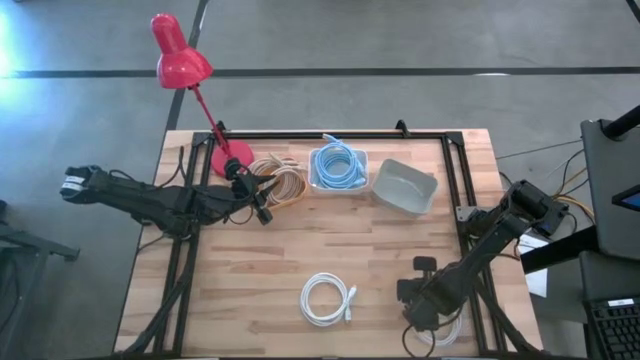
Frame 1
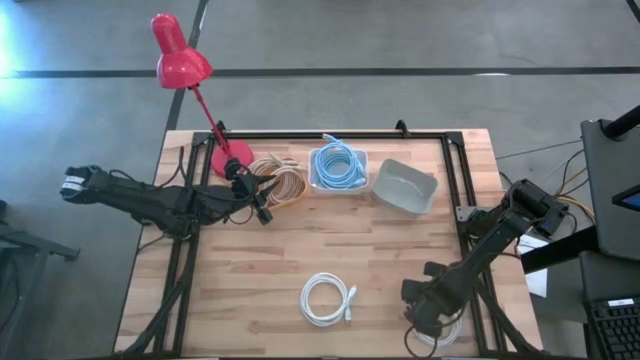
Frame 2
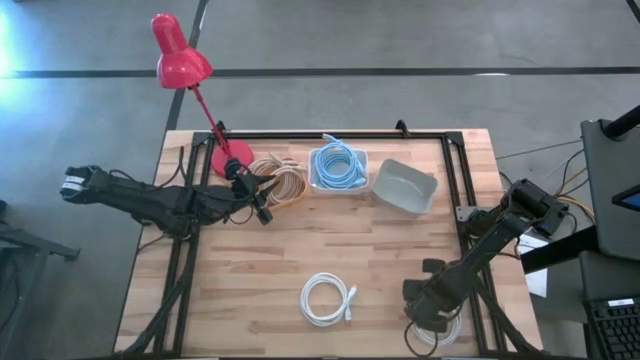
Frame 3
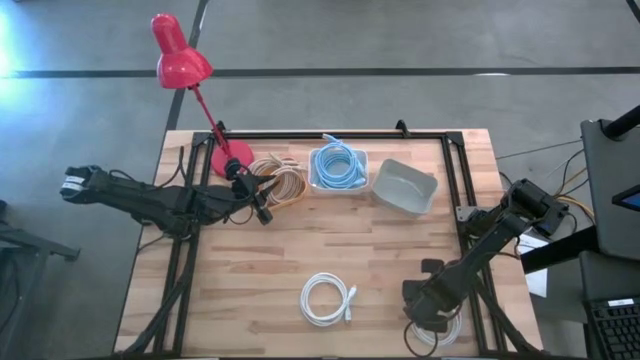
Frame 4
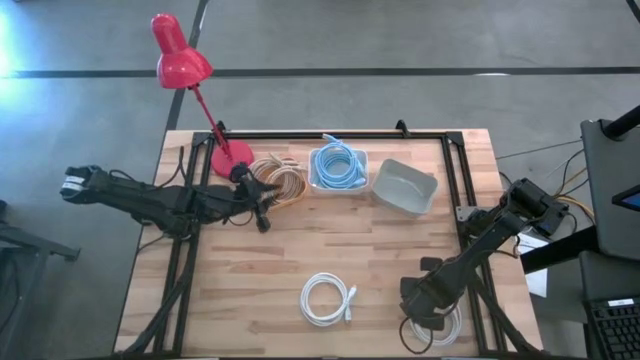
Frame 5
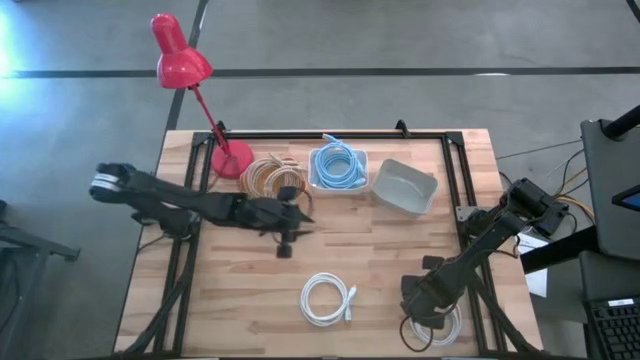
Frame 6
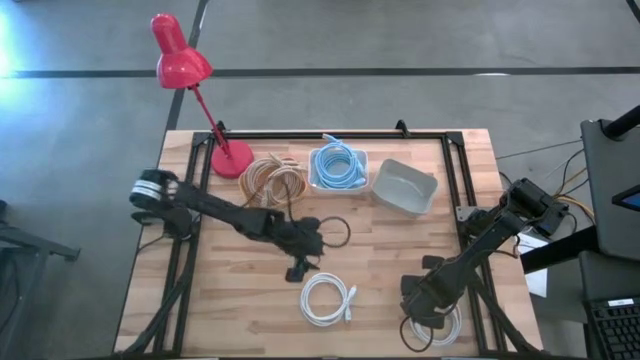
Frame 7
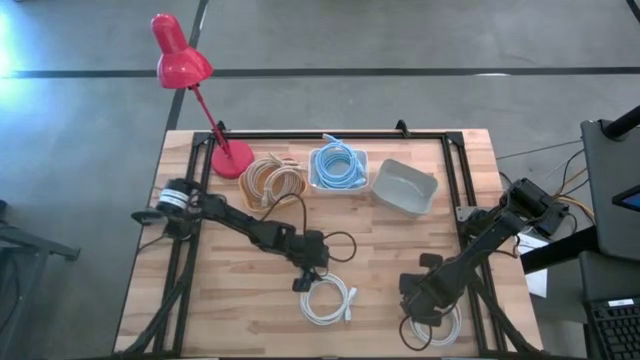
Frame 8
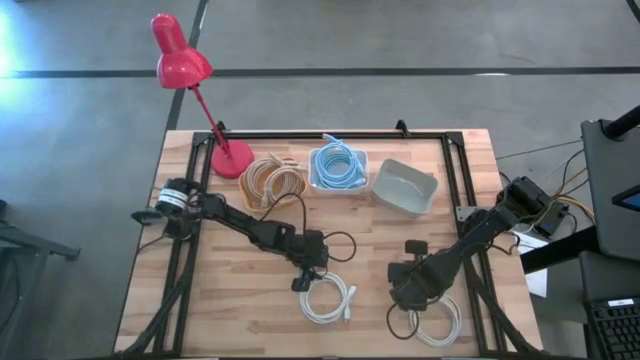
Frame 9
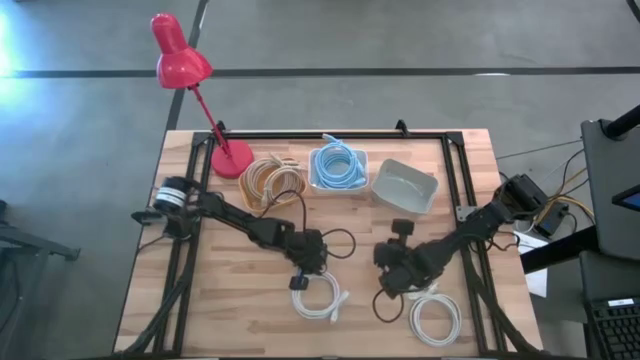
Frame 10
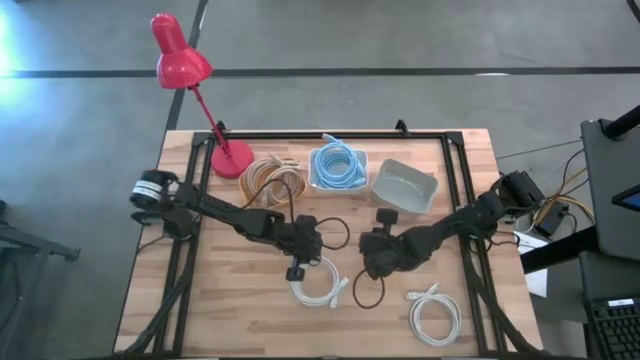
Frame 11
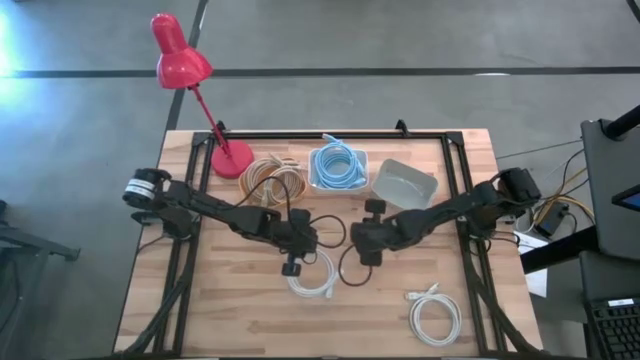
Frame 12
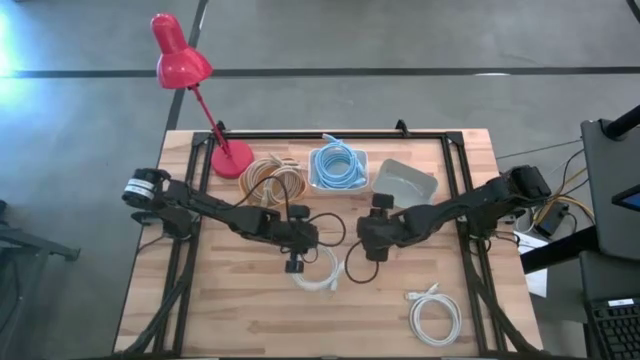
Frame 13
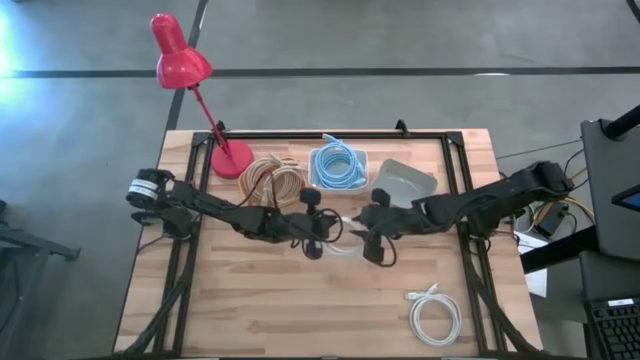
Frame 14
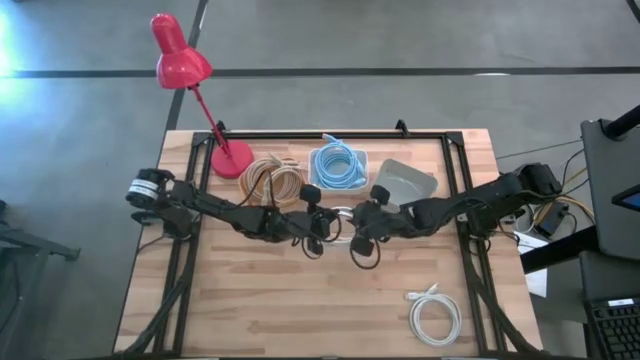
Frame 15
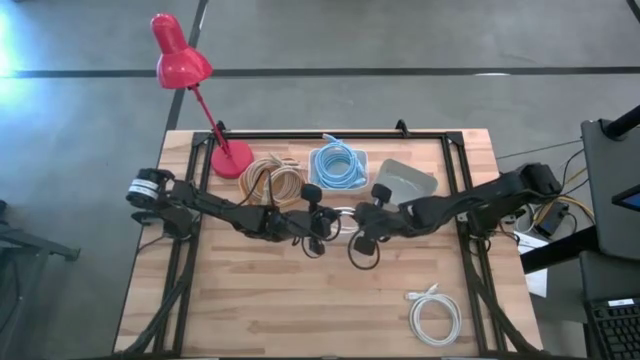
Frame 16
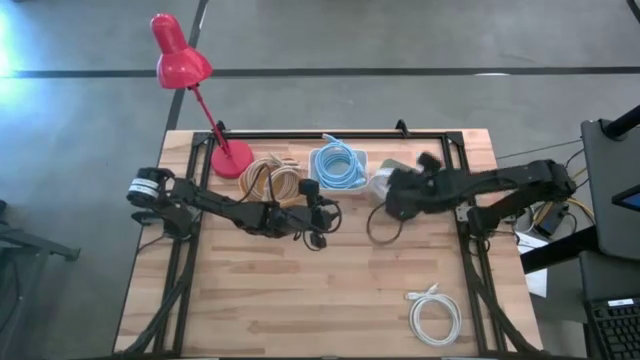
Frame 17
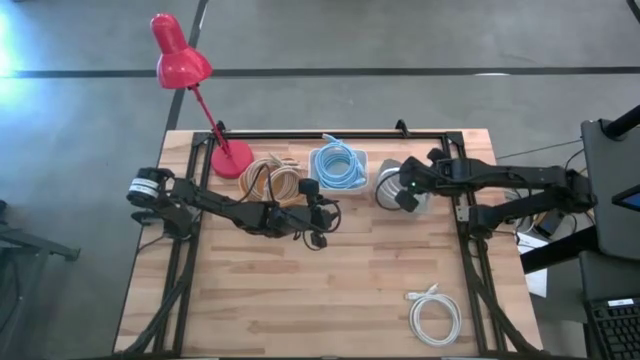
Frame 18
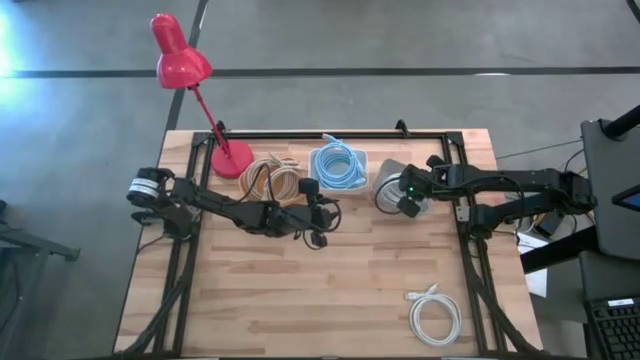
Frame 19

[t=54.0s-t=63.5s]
Task: Pick & Place USB Port
Put the left white usb cable into the grey bin

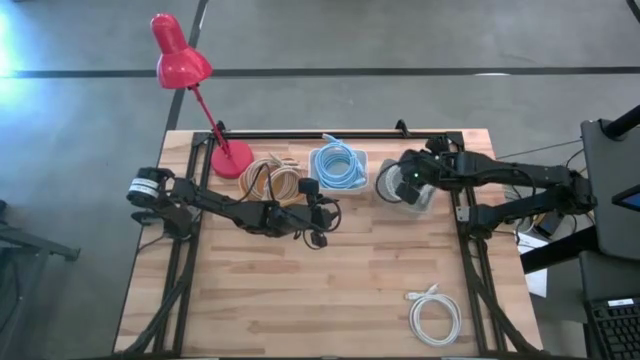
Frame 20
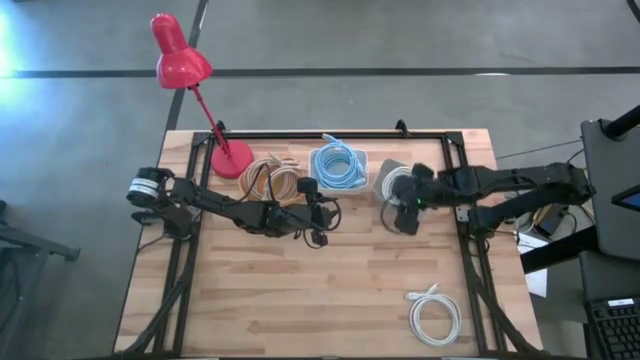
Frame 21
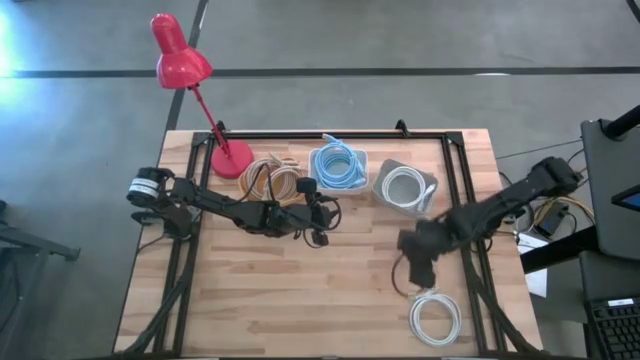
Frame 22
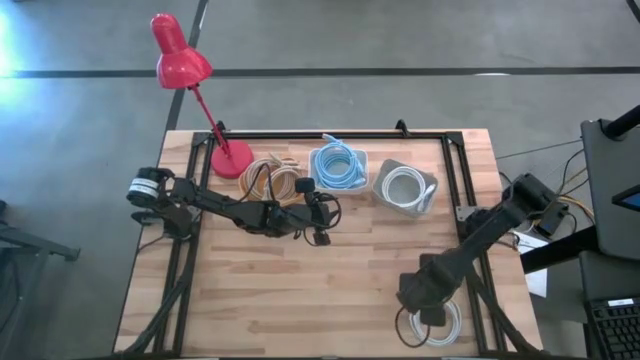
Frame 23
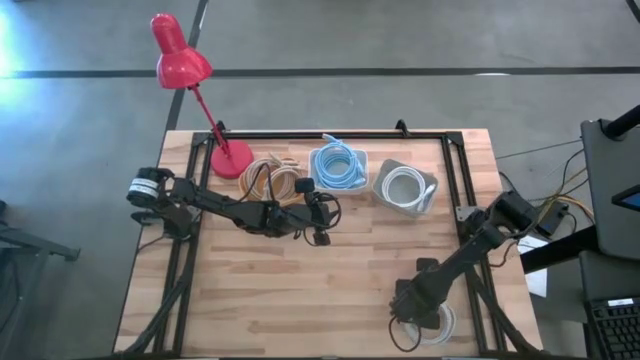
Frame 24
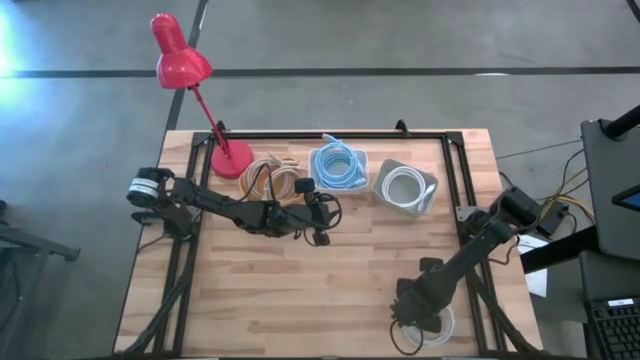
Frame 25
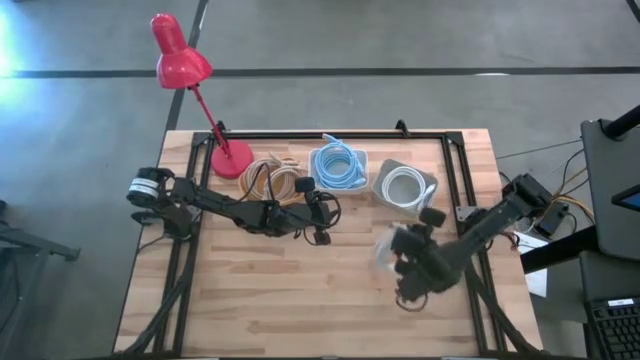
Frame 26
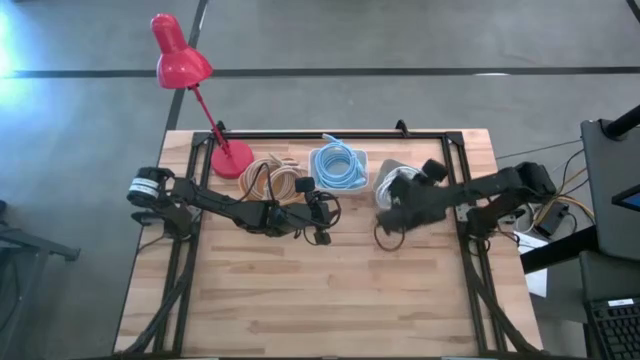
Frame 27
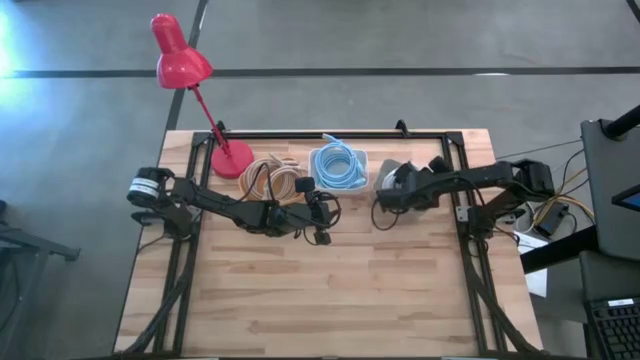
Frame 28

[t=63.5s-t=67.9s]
Put the white usb cable into the grey bin

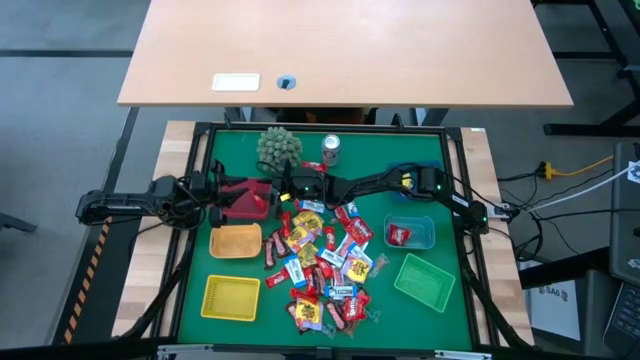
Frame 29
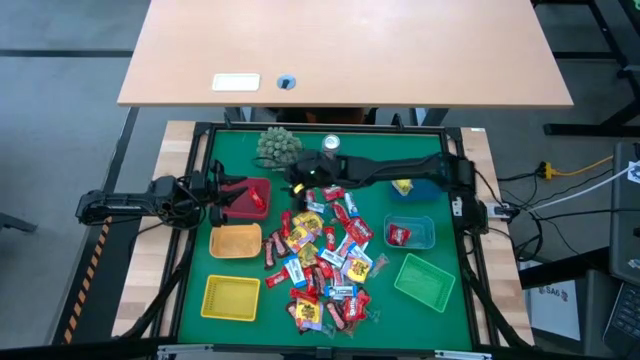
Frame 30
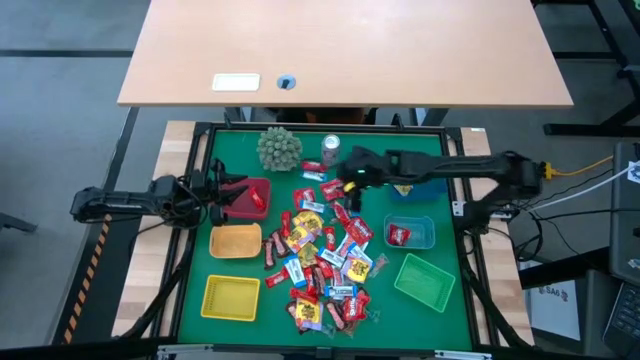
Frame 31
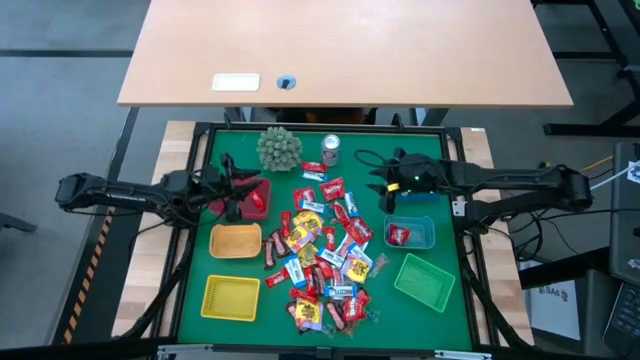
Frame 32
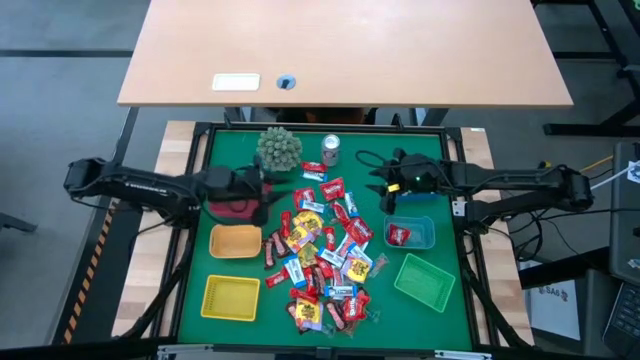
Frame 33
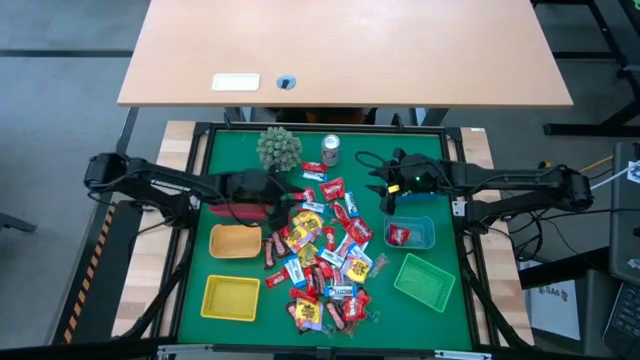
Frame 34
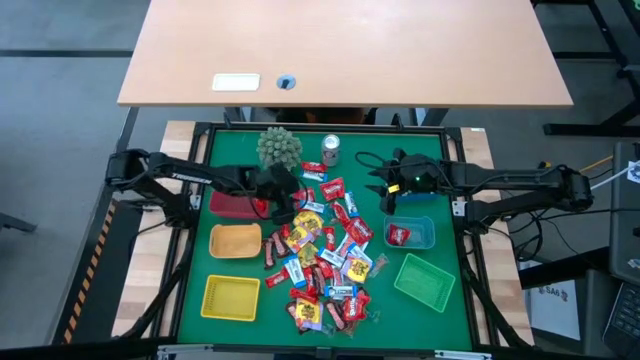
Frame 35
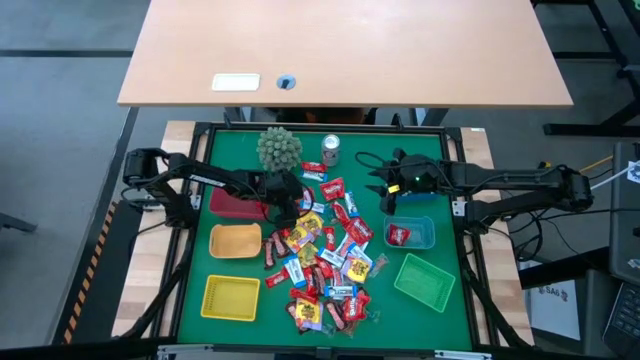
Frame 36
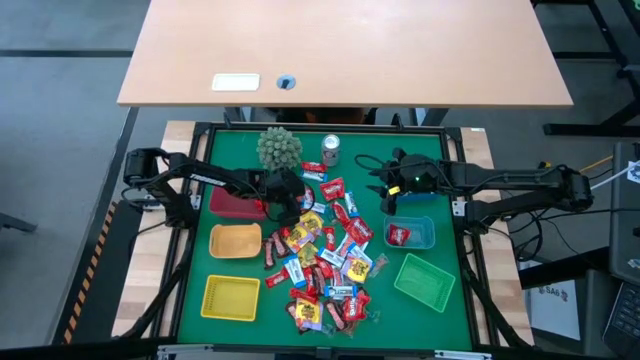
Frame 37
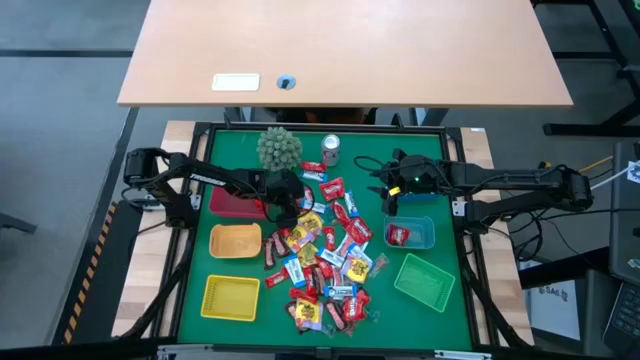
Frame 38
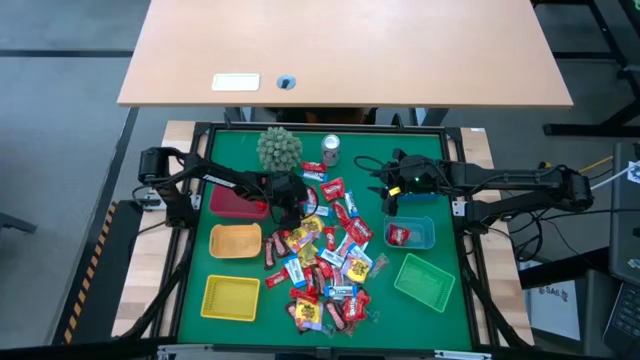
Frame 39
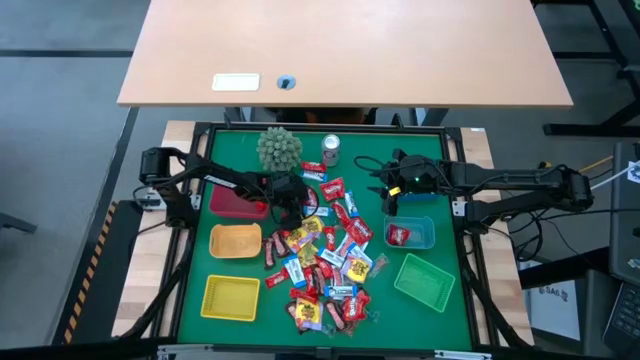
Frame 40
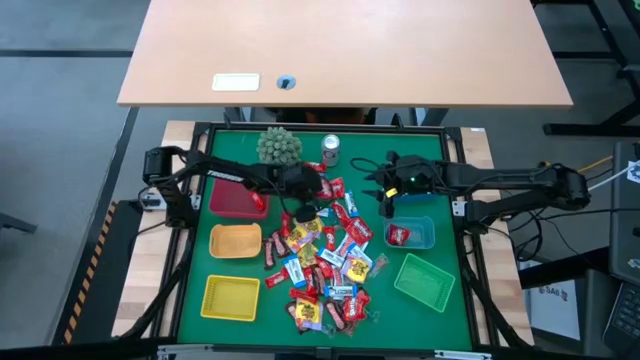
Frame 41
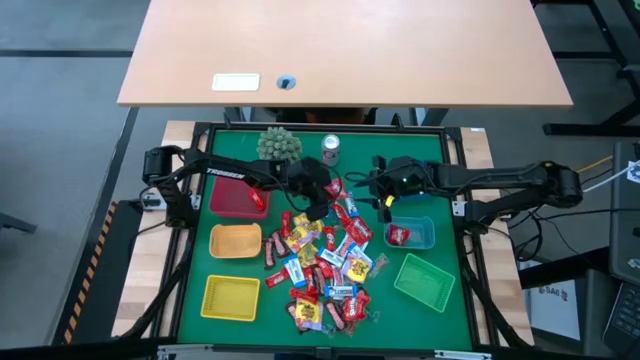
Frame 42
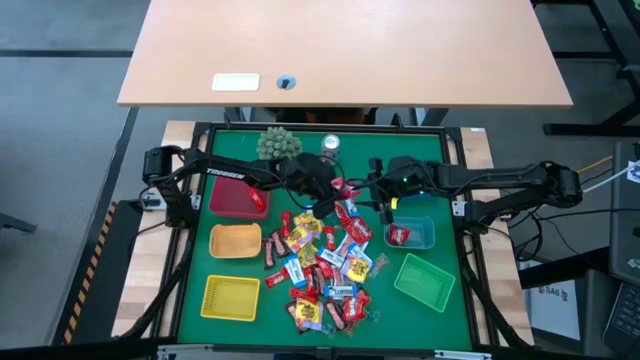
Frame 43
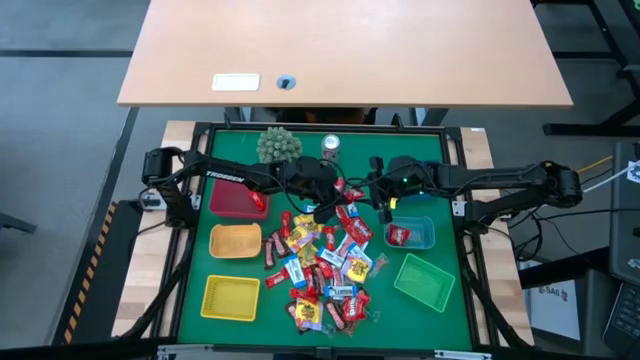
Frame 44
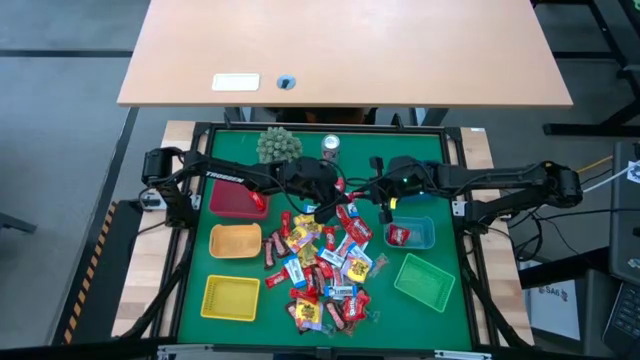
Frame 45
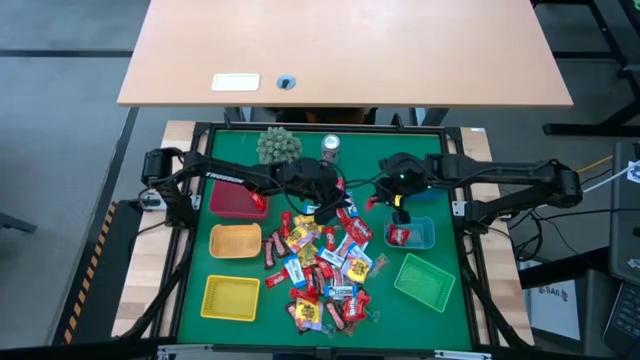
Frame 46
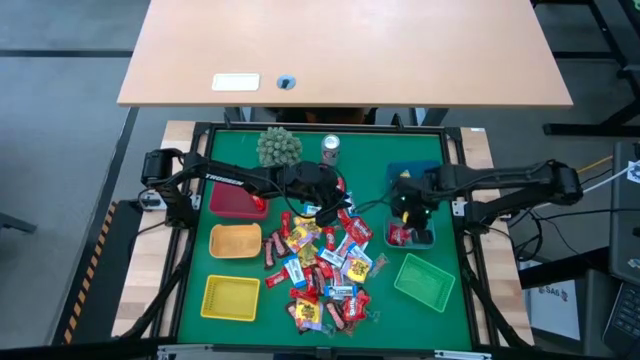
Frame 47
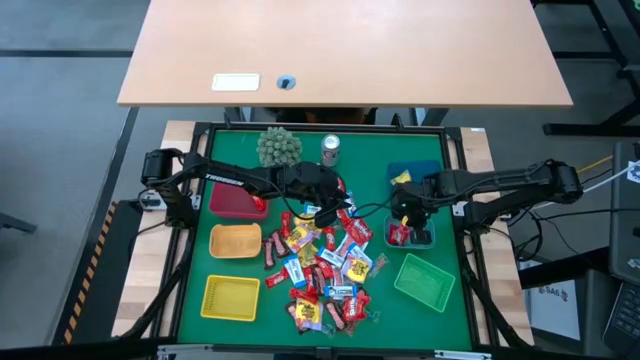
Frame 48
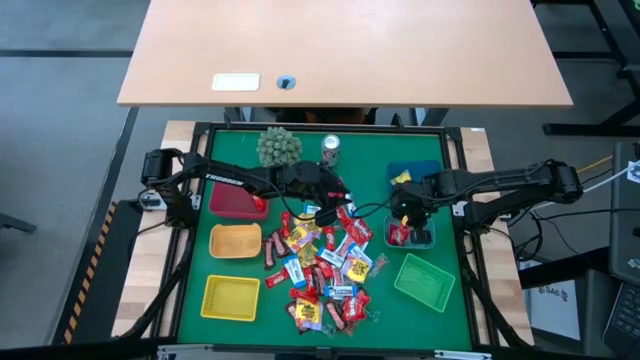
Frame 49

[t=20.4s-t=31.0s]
Task: Sort candy
Put the red candy into the light blue bin
